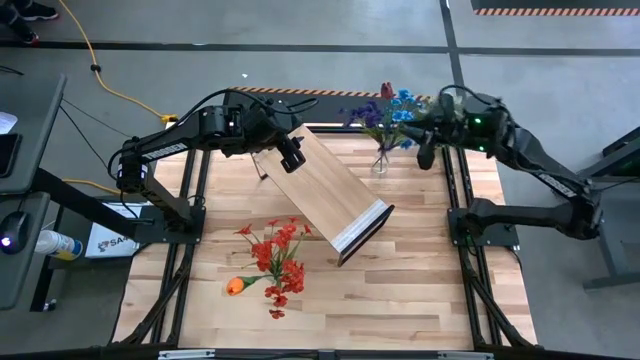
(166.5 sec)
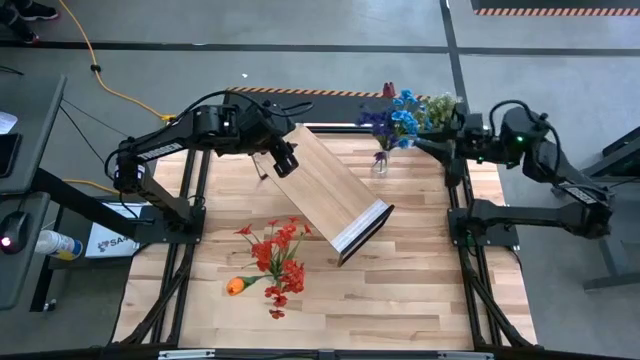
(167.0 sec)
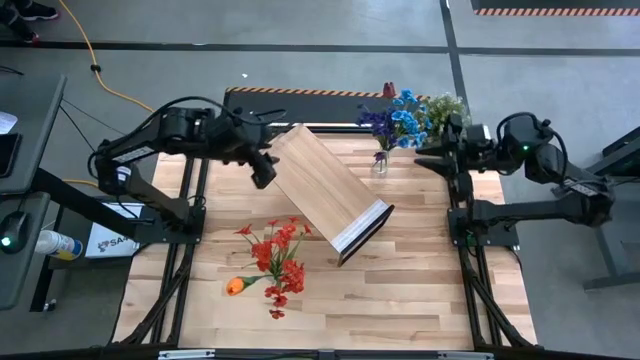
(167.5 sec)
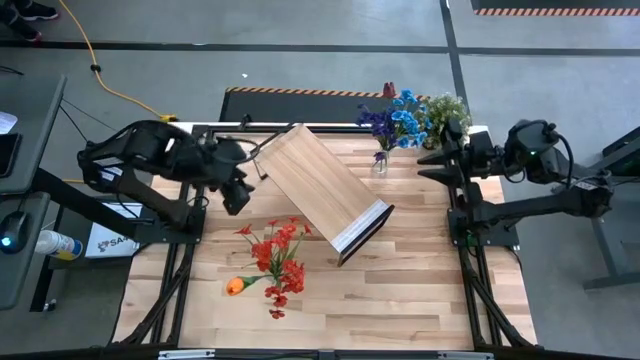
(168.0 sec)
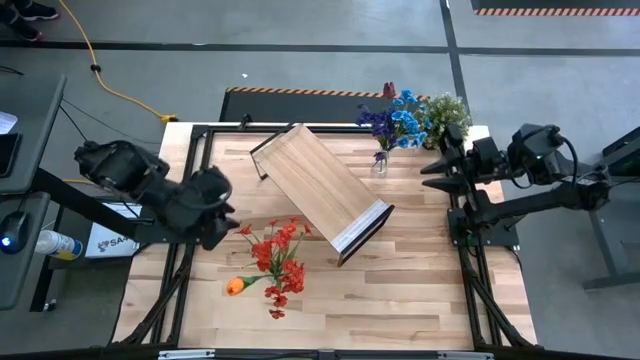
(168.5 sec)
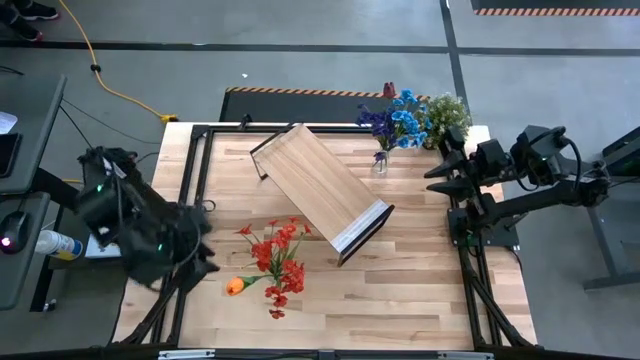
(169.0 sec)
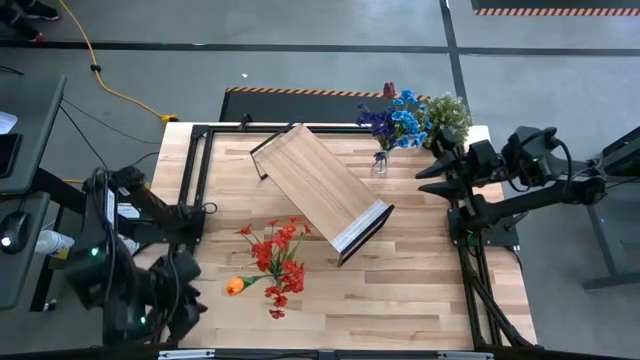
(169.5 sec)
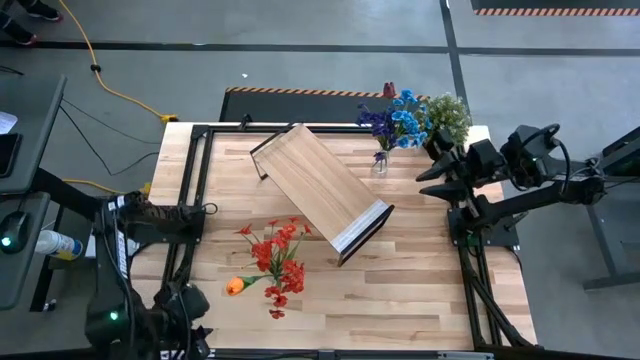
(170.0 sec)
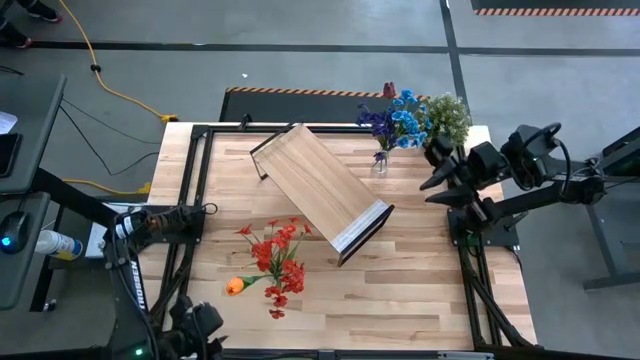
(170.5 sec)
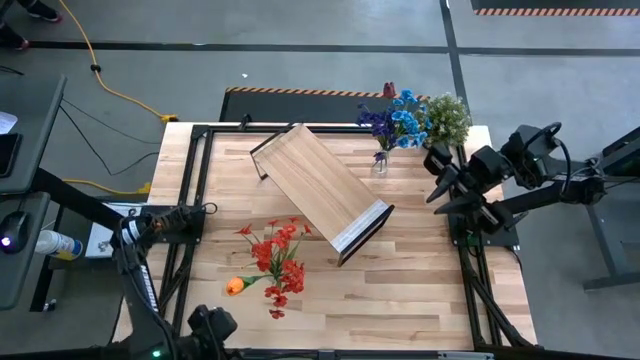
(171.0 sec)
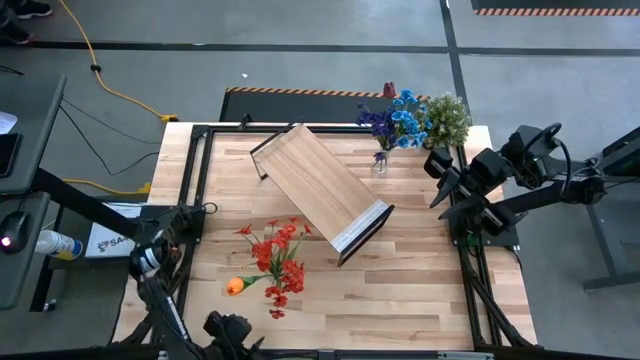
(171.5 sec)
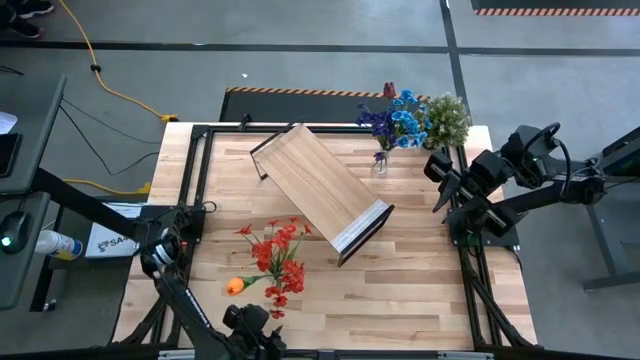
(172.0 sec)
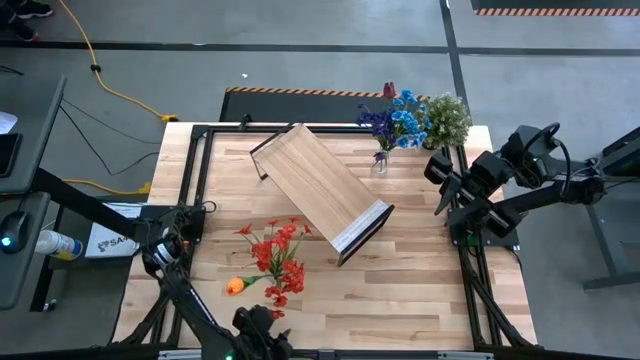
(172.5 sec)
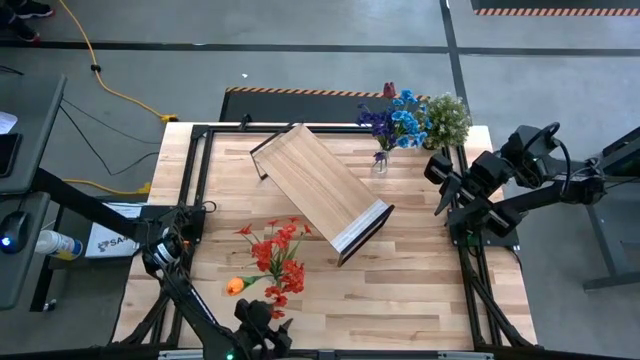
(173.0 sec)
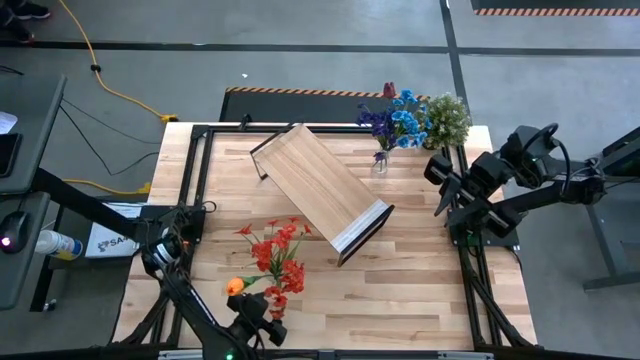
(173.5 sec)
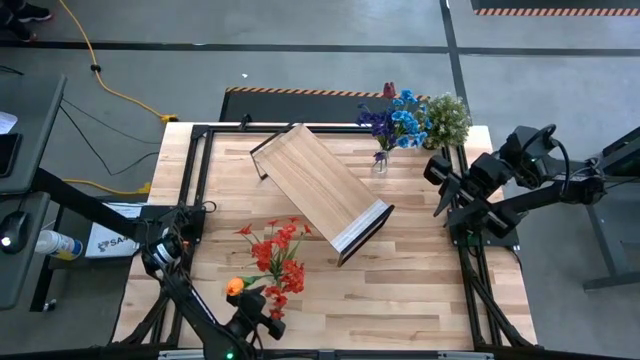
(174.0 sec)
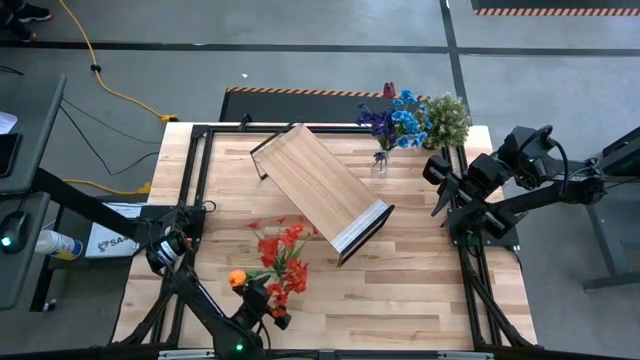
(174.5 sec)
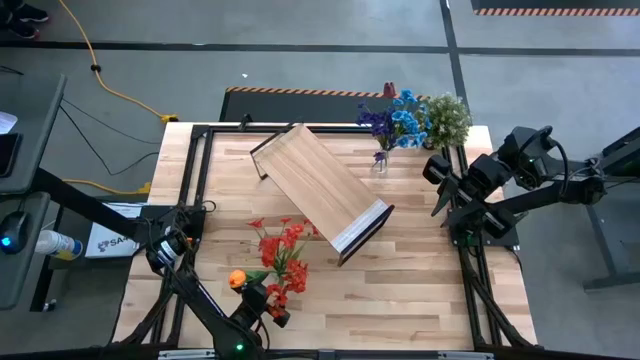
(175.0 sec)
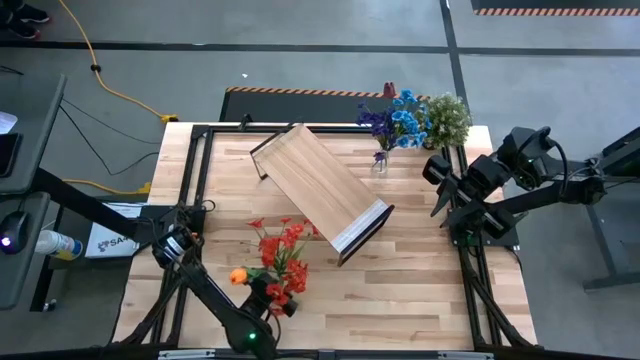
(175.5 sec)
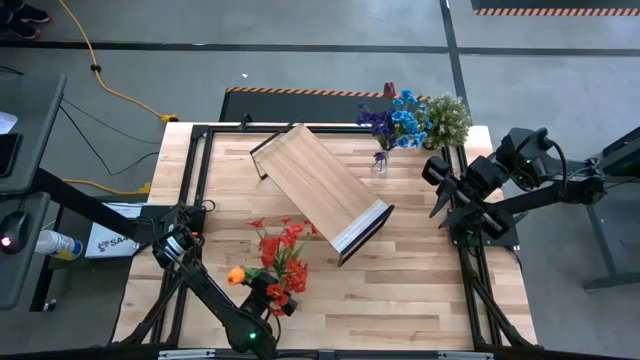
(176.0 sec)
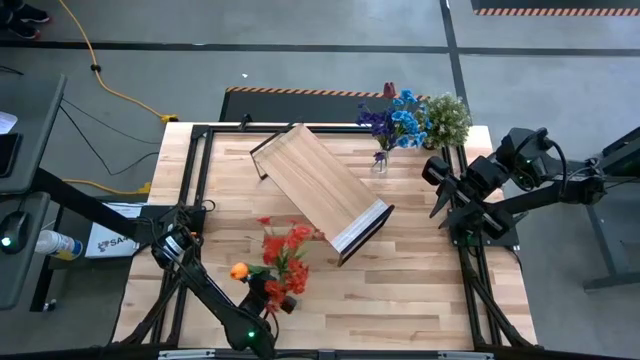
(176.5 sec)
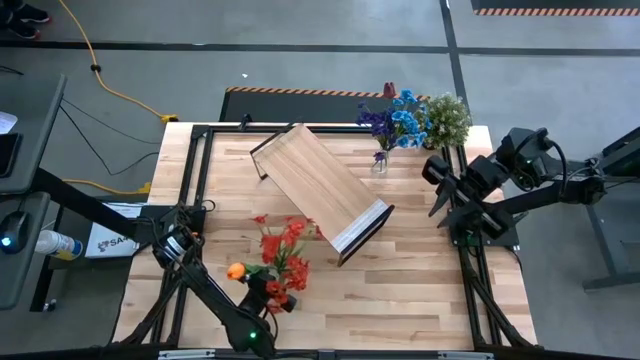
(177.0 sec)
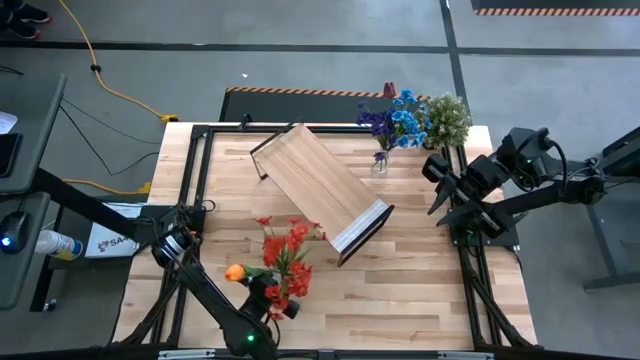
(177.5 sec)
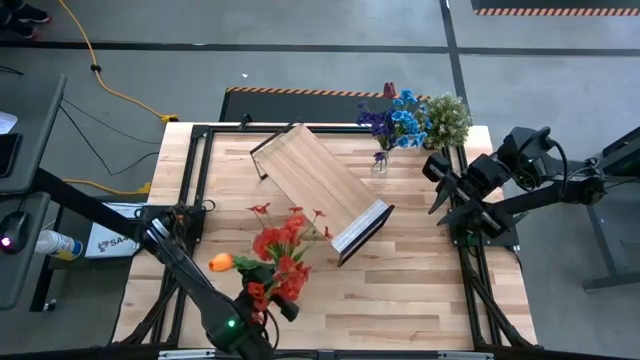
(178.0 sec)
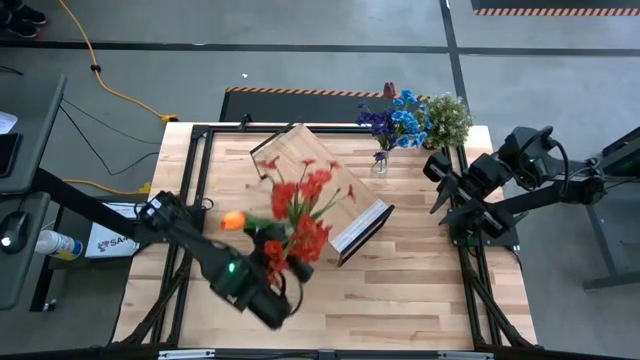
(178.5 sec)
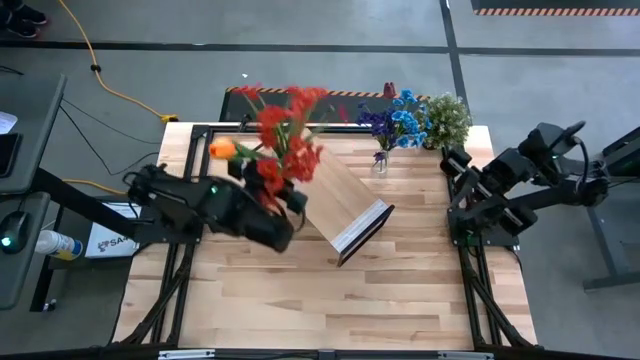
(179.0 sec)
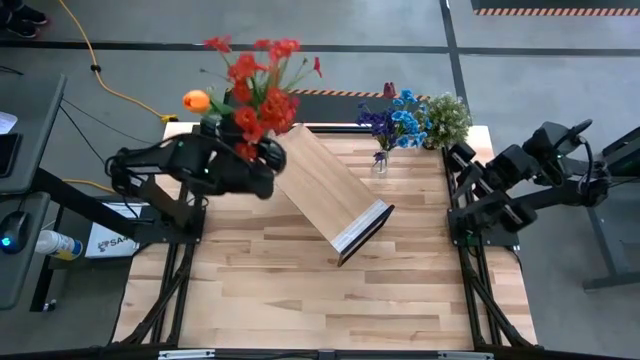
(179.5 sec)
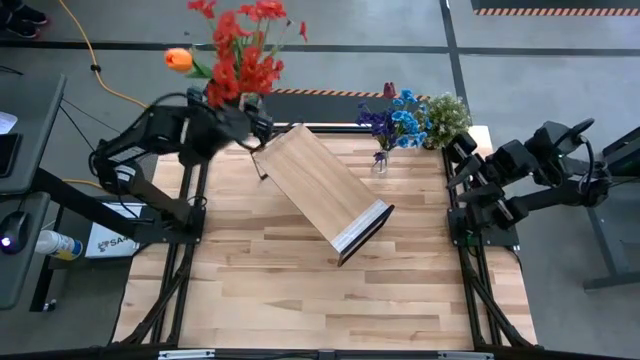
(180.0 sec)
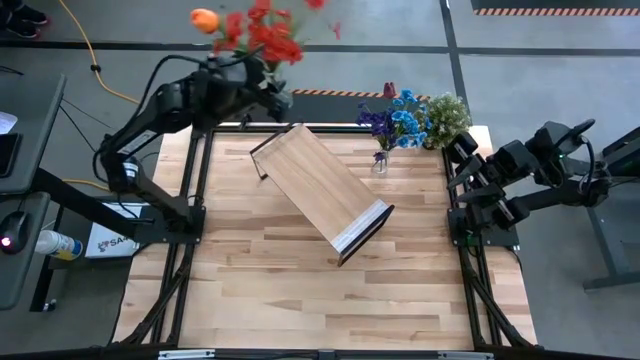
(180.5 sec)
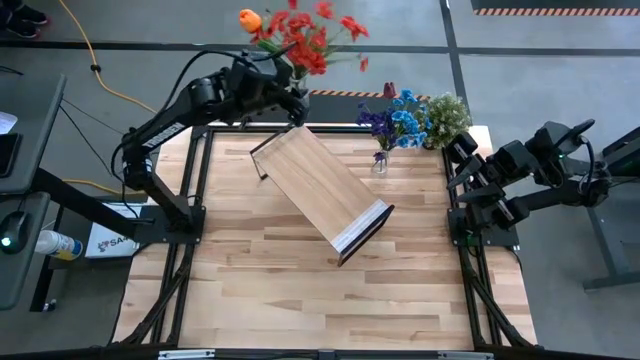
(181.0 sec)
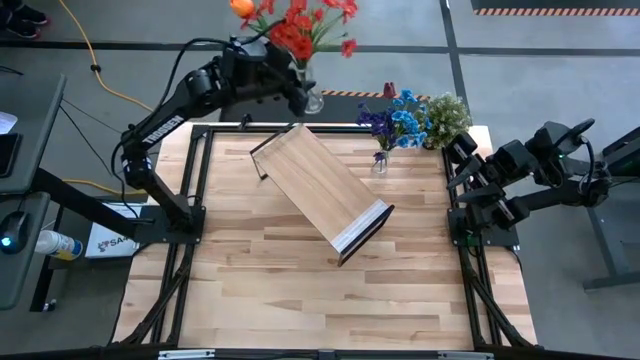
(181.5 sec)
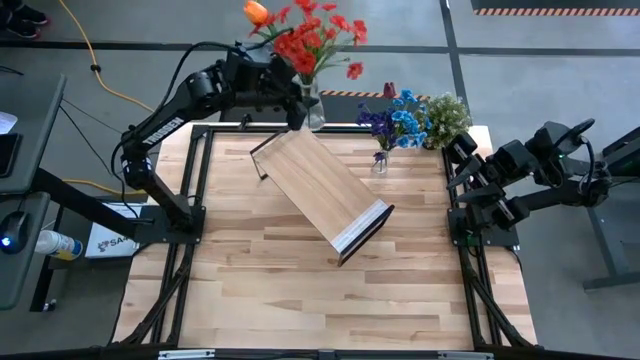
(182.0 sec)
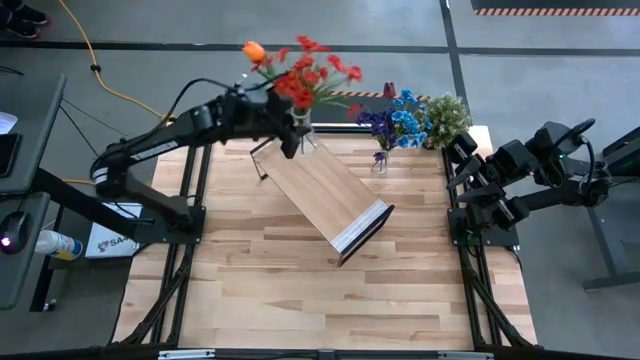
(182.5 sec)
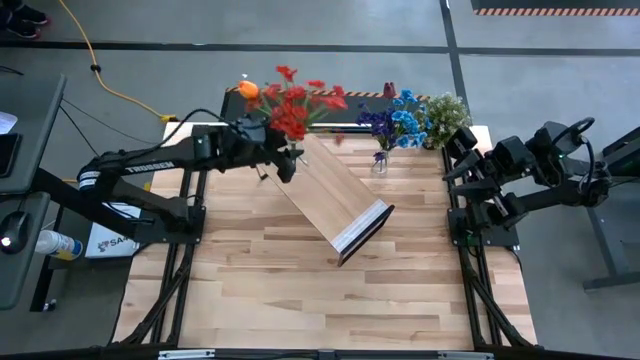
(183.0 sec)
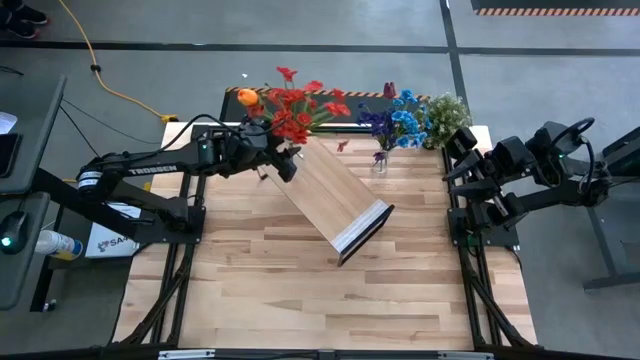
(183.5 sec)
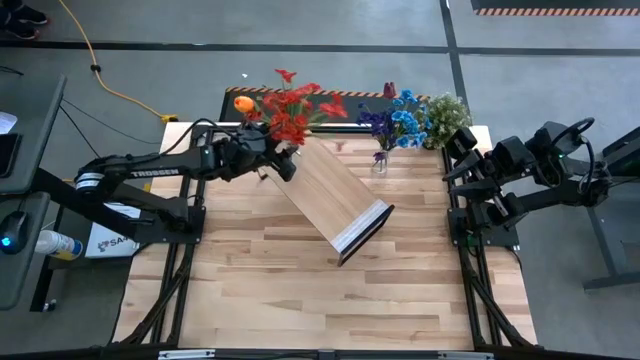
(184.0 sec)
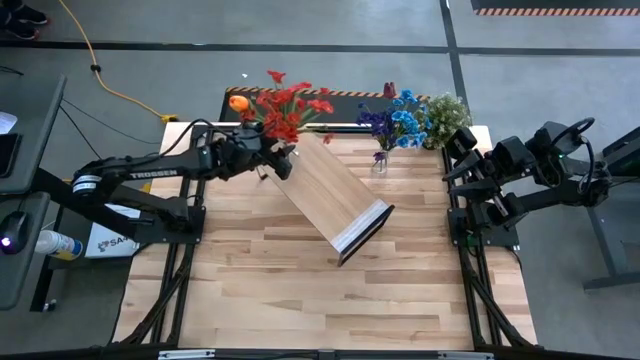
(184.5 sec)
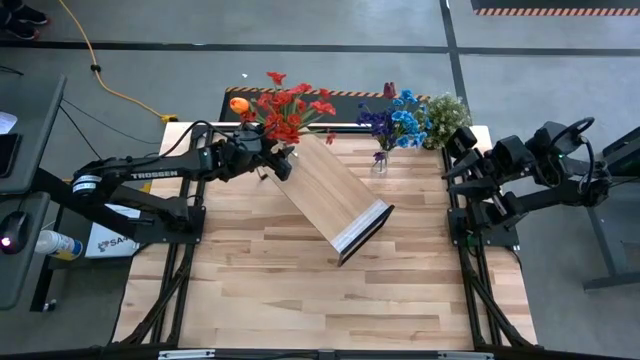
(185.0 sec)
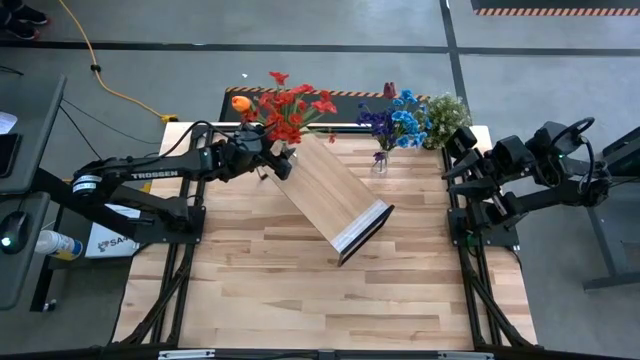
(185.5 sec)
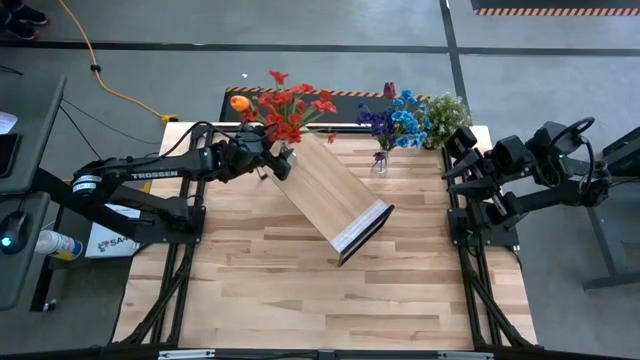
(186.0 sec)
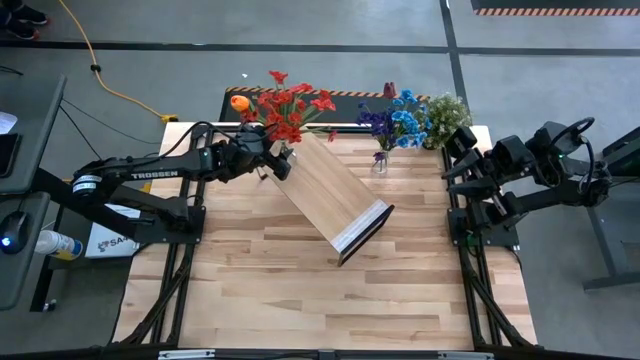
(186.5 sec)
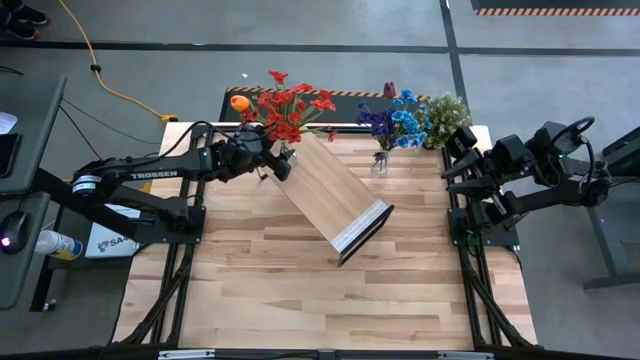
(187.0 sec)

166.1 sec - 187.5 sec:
Task: Pick and place flowers into a vace then onto a shelf
Put the bottom transparent vase on the shelf
